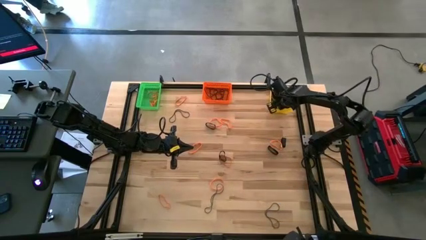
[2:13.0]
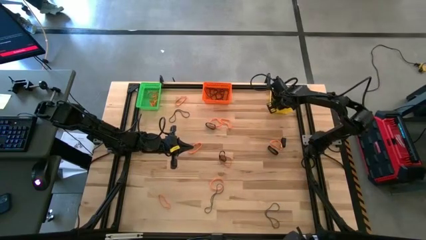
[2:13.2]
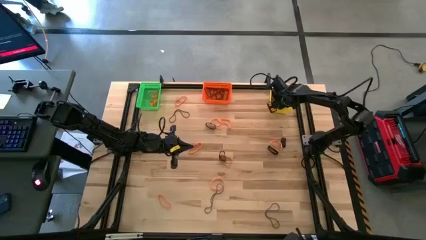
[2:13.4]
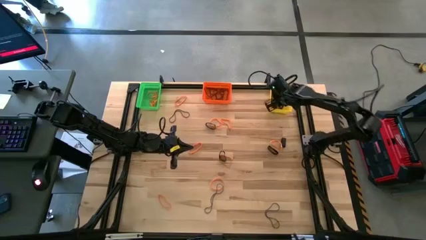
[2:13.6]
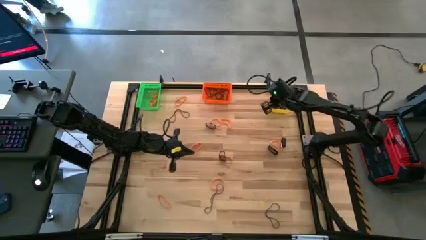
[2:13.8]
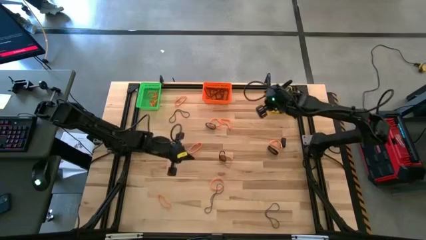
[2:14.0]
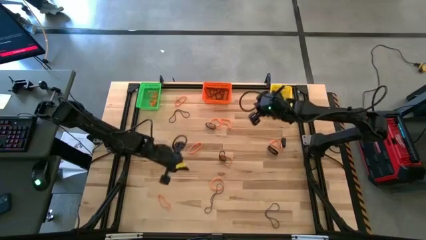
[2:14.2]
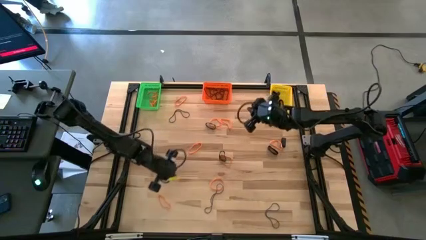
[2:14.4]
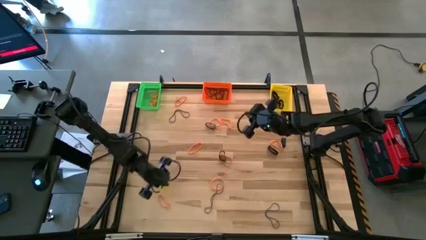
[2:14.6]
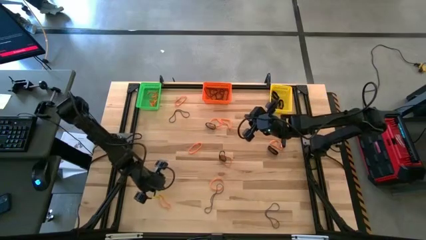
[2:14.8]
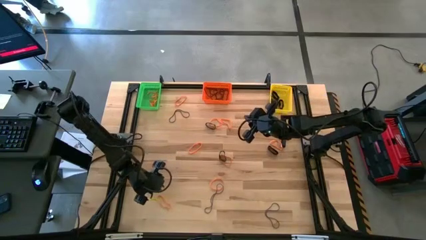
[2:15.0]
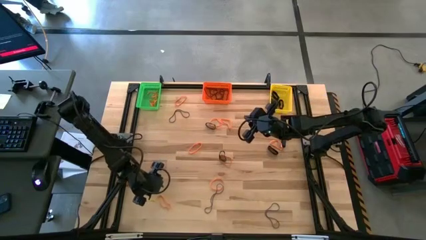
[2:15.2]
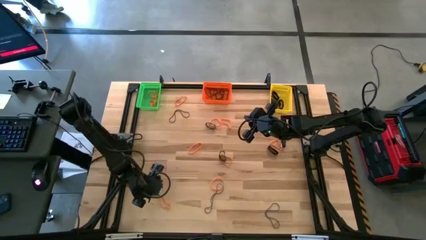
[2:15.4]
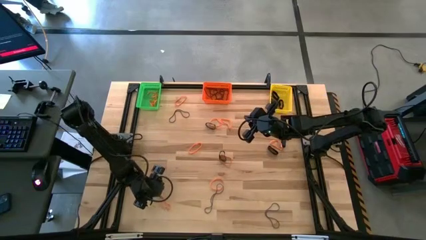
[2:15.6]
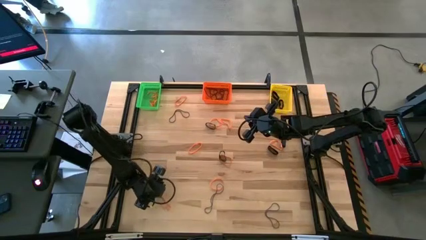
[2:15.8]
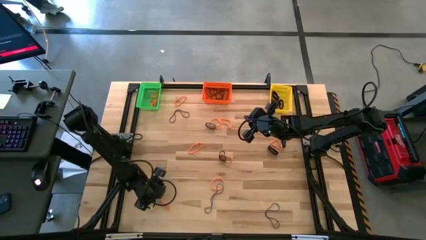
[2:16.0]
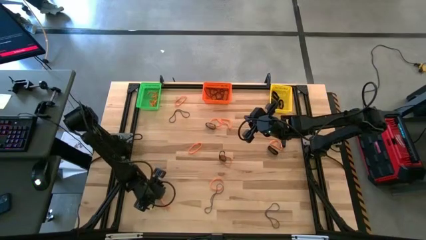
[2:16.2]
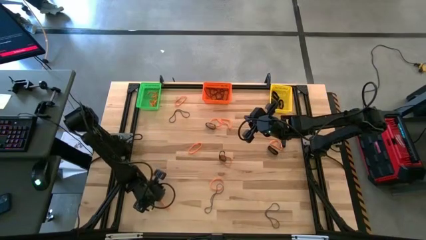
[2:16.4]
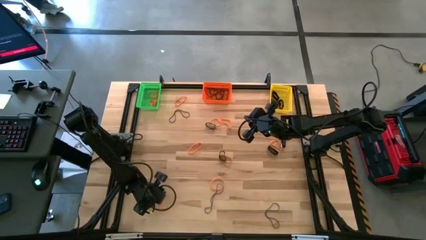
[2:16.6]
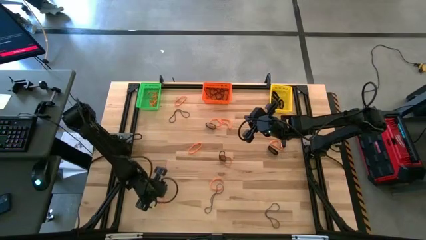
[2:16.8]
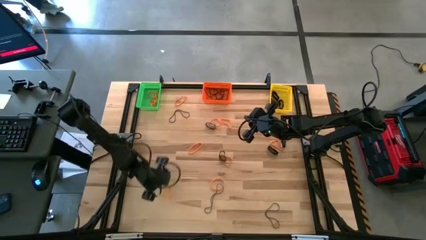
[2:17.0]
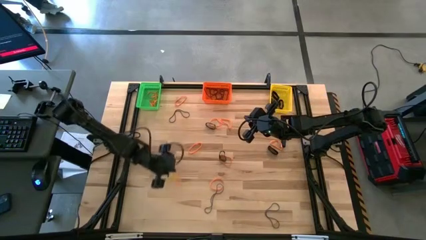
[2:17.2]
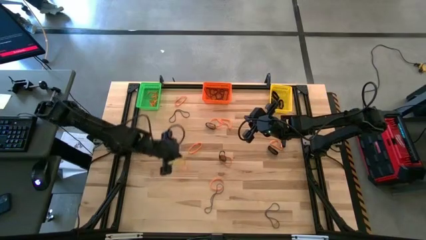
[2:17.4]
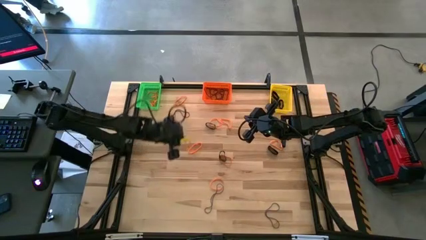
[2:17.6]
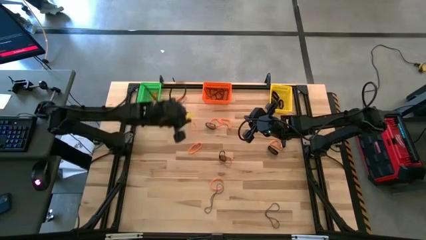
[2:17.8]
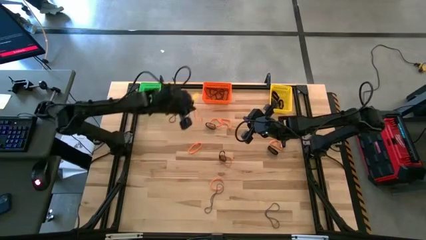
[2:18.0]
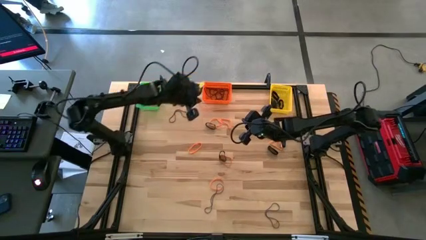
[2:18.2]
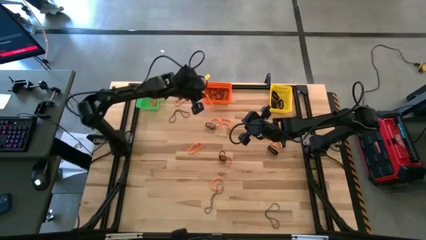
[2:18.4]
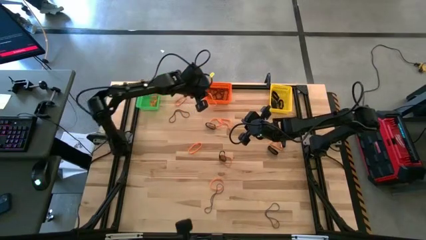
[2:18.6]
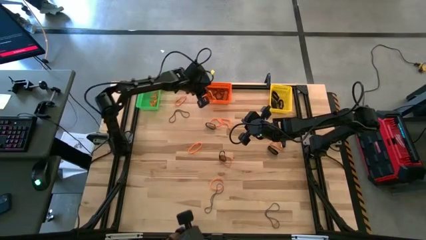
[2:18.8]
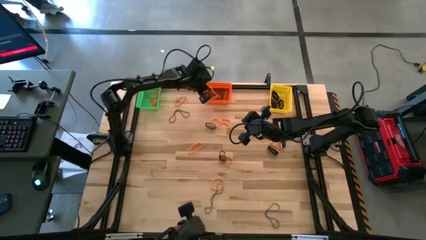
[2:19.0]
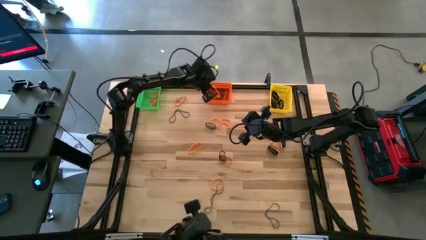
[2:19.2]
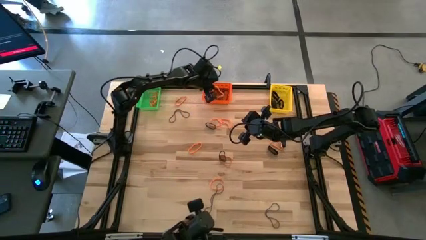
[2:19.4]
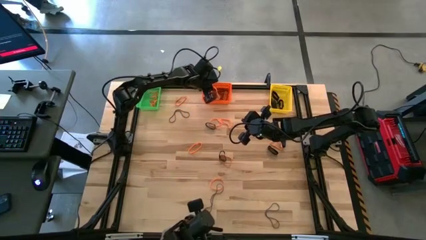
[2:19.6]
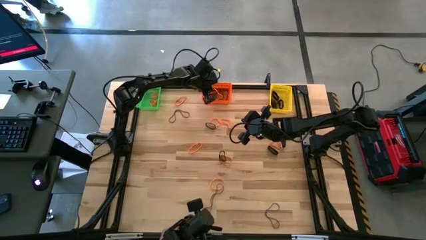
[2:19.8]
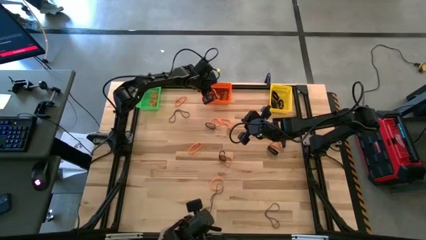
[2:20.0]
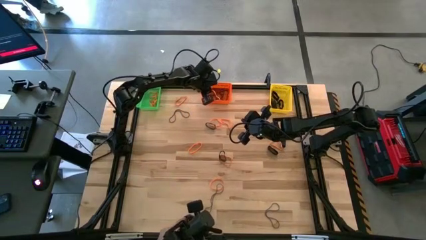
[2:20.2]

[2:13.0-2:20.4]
Task: Sort rubber bands into baskets
Put the bottom left orange rubber band into the orange bin

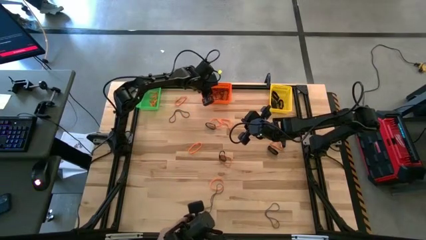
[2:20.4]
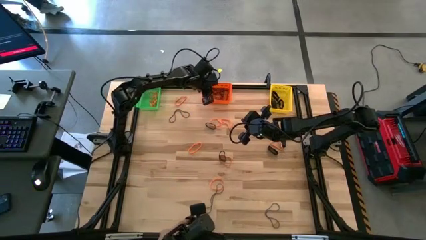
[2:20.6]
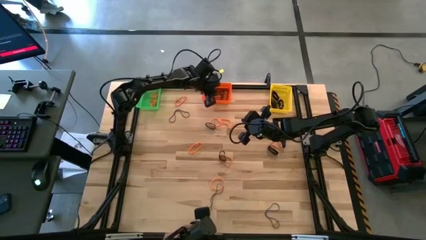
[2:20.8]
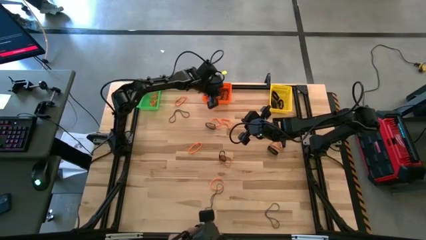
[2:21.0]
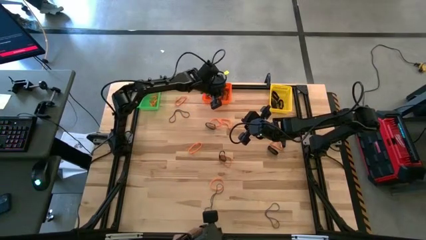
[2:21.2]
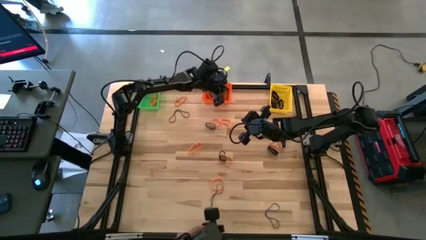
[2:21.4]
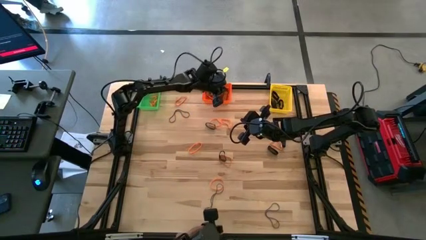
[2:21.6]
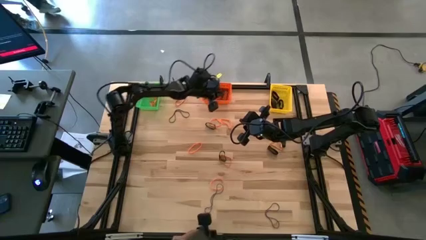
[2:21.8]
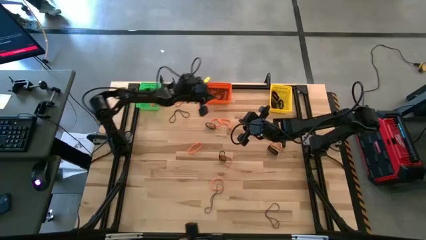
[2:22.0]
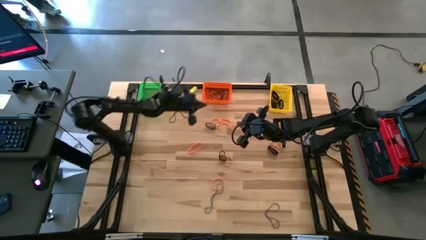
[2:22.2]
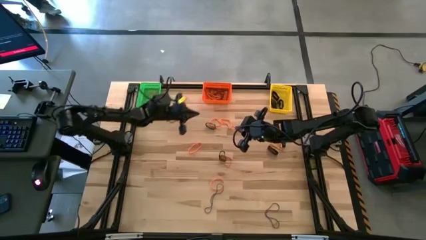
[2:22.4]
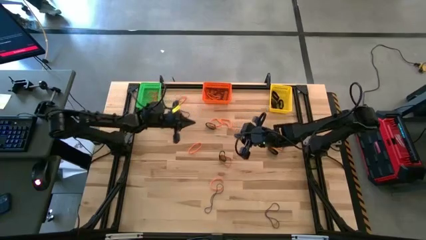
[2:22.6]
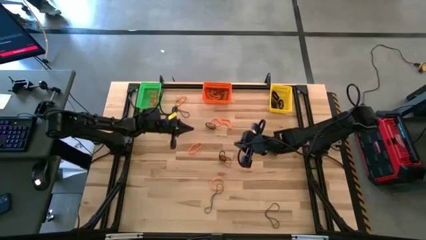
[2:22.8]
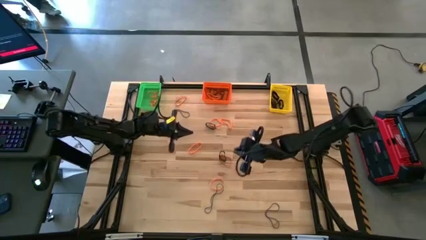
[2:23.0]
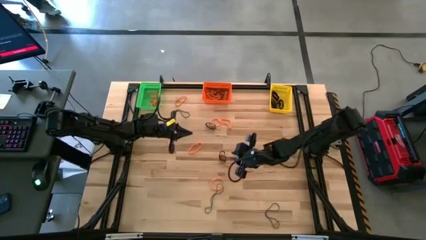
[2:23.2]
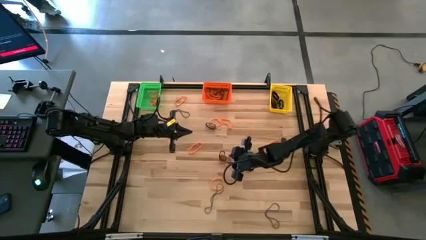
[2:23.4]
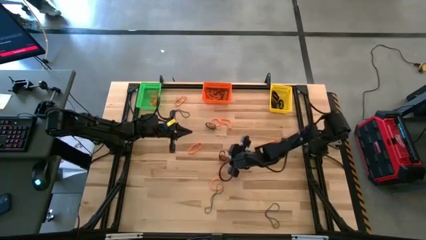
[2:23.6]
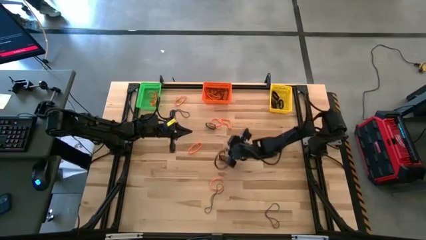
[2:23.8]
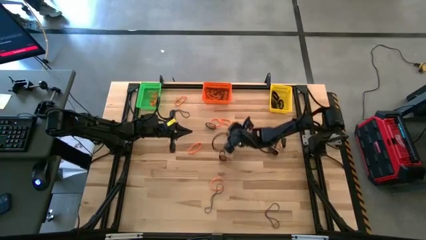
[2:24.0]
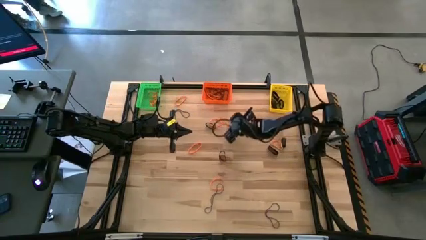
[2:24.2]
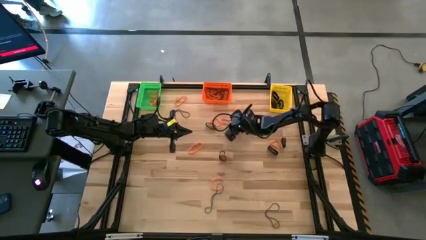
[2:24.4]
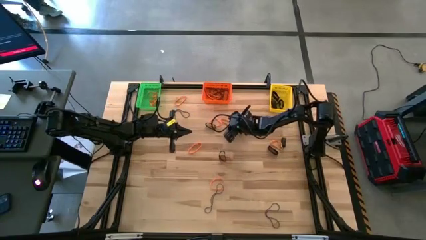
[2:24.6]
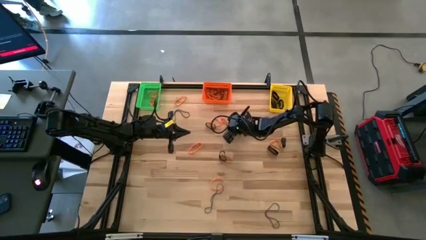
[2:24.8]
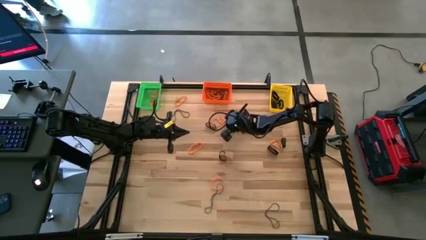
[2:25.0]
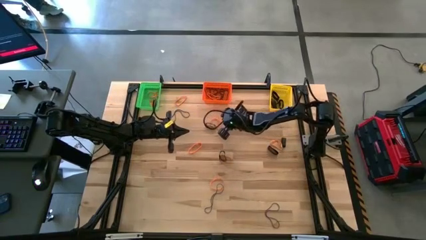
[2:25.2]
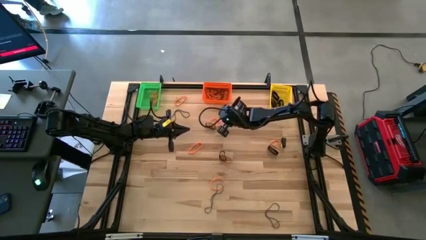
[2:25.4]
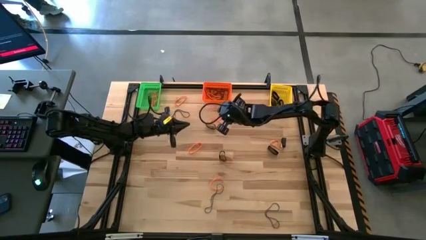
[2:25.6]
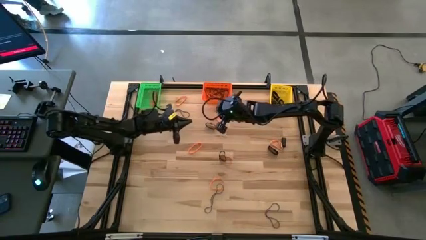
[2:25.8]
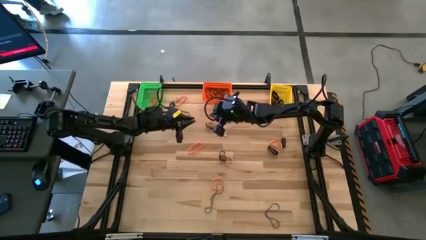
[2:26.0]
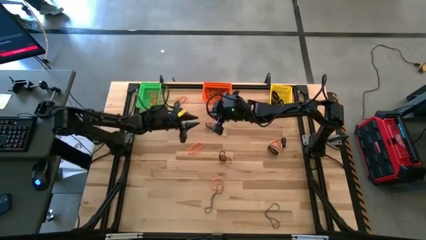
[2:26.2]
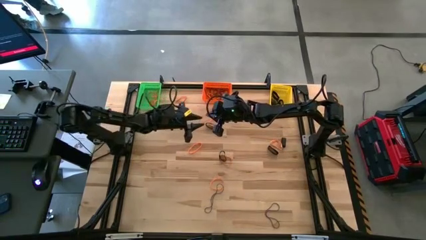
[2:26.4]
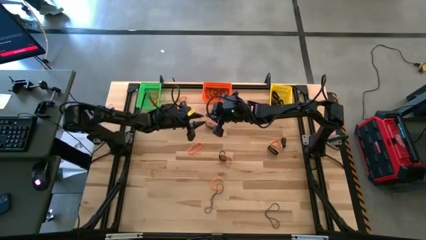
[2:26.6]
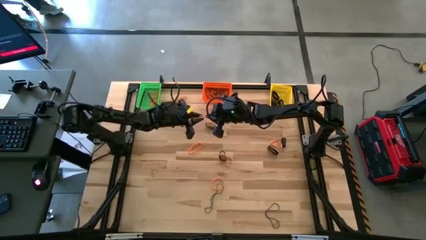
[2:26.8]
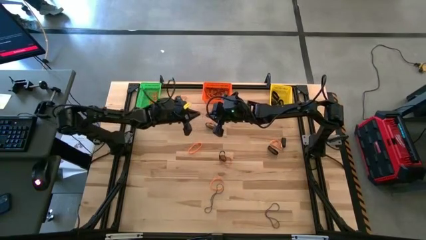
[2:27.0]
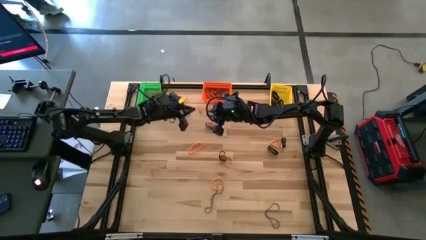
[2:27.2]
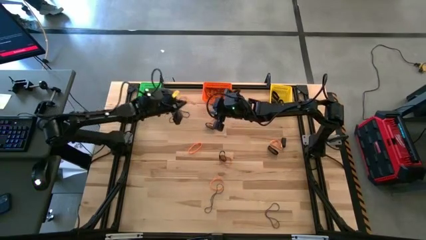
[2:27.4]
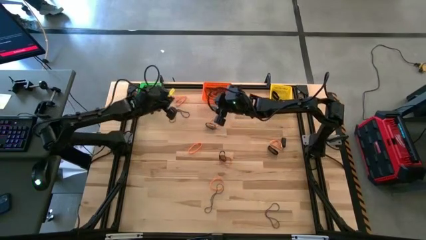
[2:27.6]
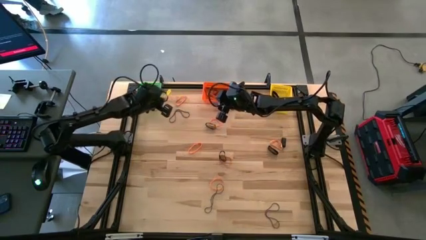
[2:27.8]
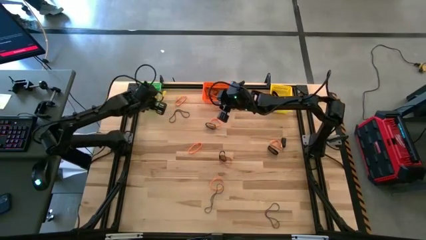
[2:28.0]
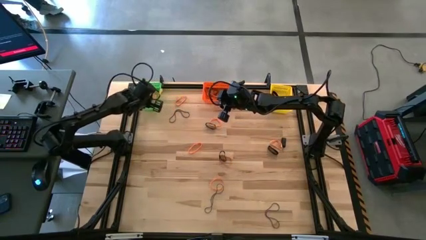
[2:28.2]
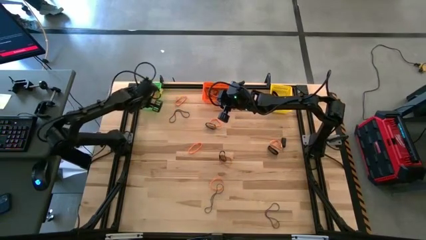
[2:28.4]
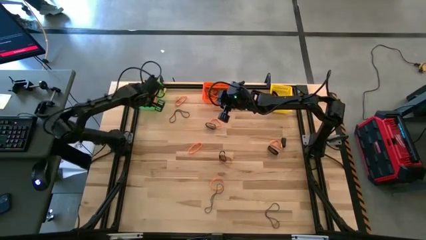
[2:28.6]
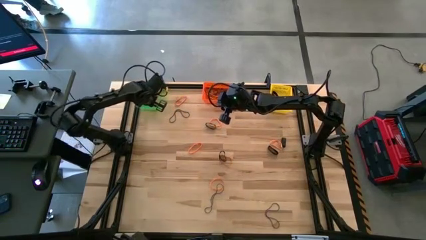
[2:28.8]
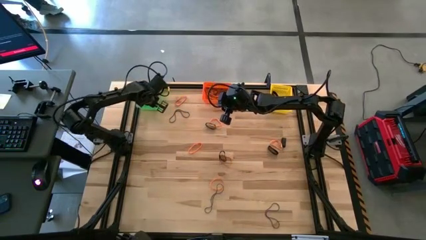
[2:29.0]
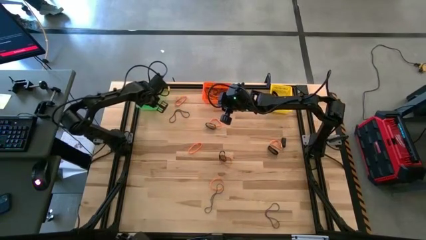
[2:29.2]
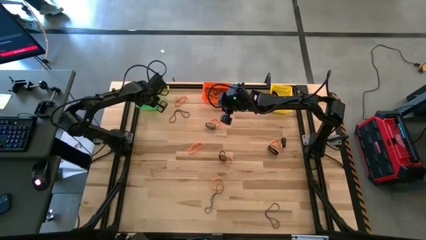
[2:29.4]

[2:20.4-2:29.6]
Put the top center orange rubber band into the green bin
